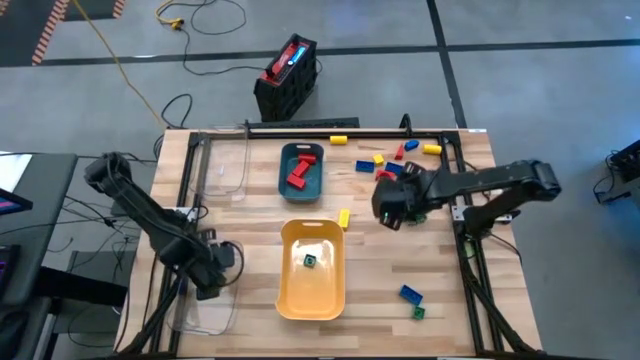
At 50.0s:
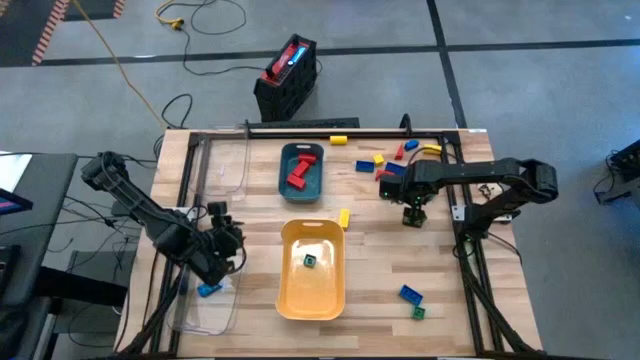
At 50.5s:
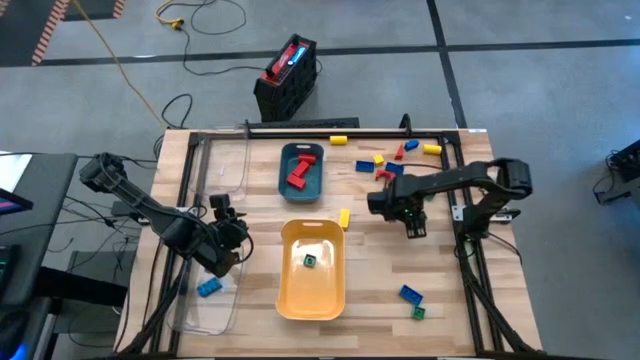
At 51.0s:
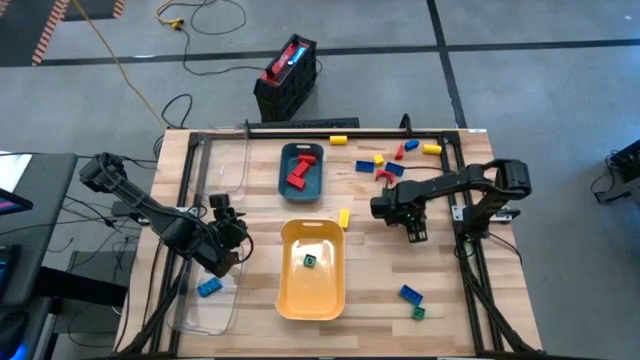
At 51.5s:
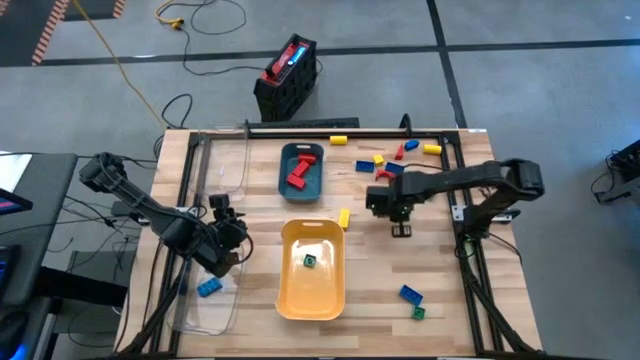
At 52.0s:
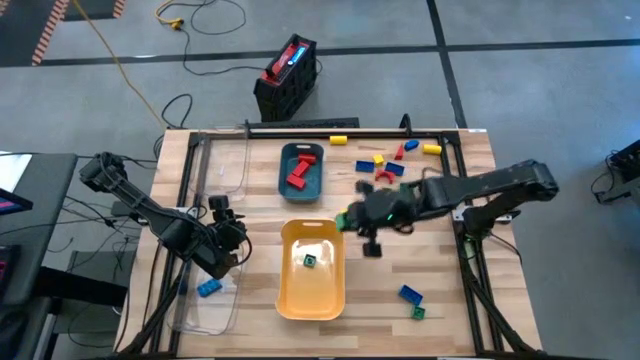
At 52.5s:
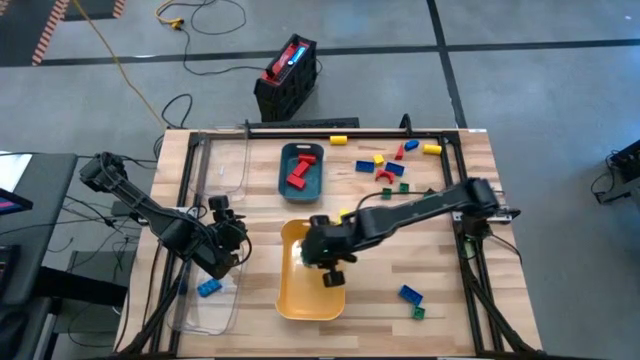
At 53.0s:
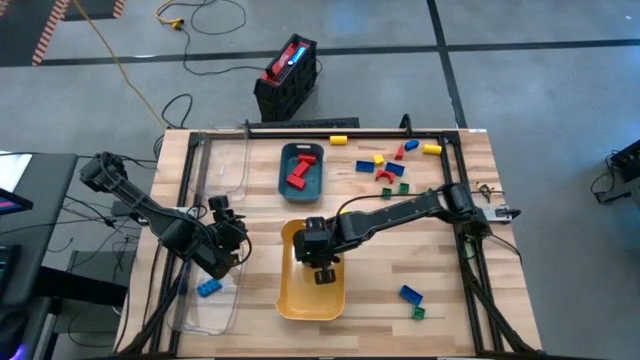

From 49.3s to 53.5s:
Task: Sort blocks
Put the rectangular green game piece into the yellow bin

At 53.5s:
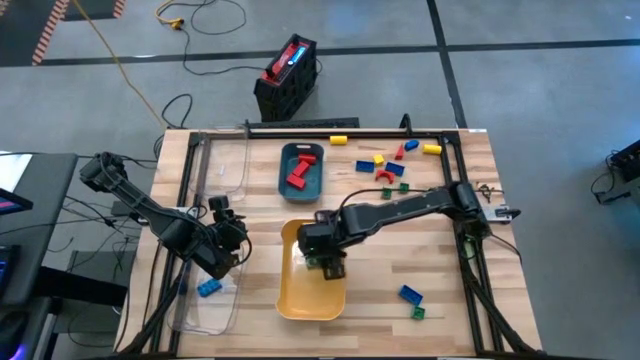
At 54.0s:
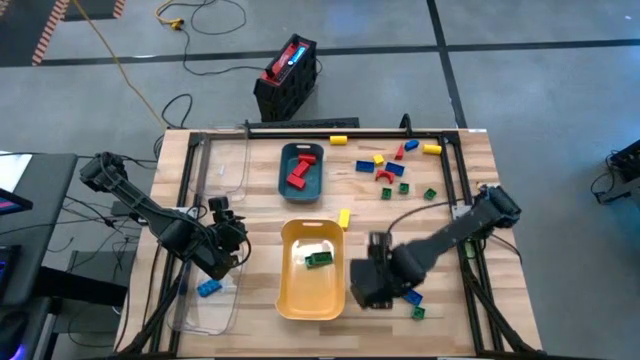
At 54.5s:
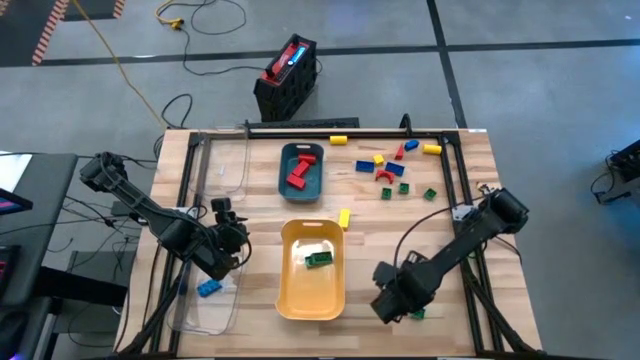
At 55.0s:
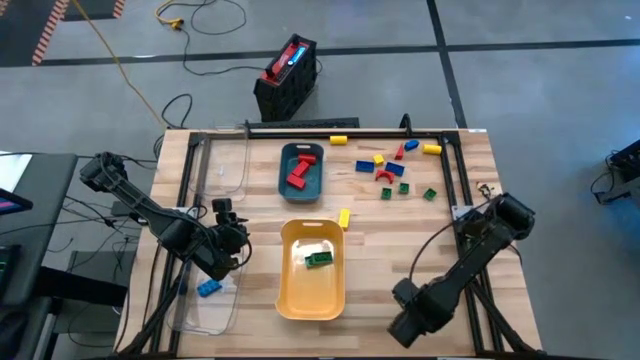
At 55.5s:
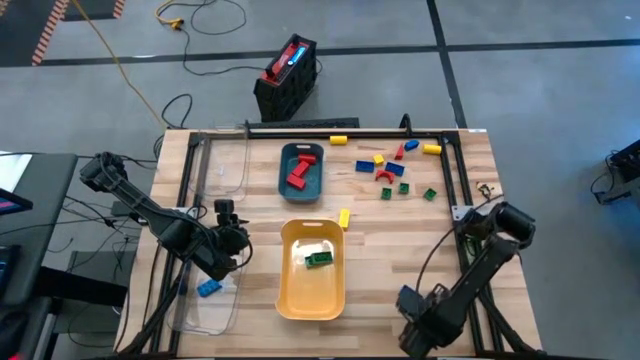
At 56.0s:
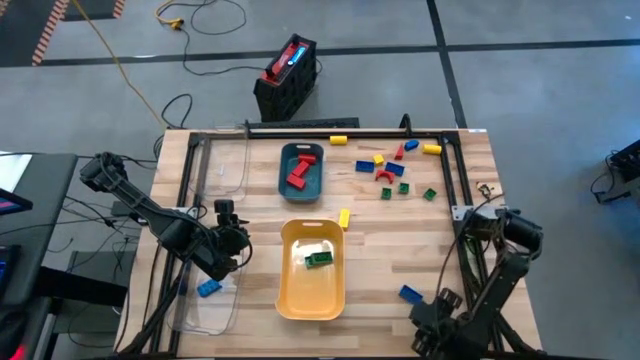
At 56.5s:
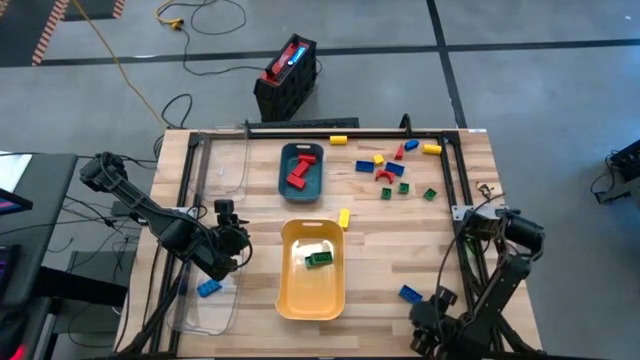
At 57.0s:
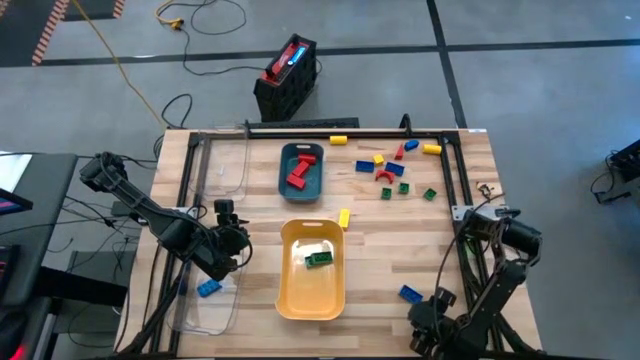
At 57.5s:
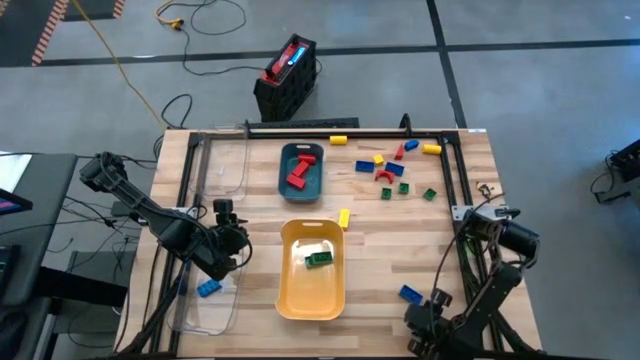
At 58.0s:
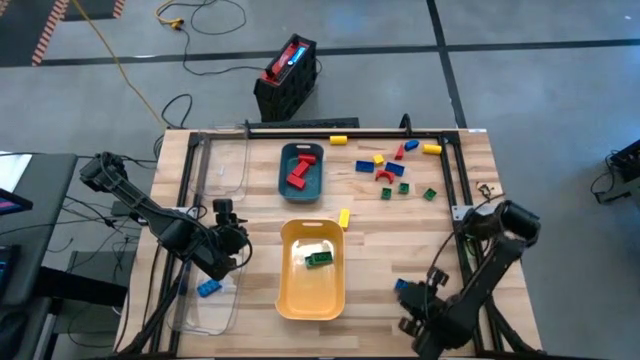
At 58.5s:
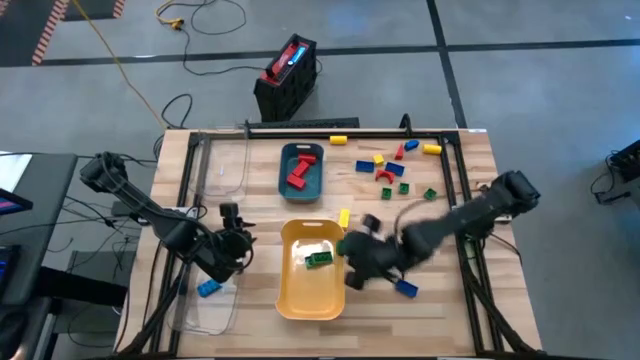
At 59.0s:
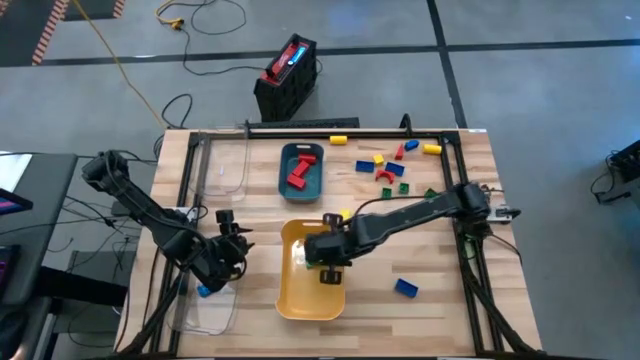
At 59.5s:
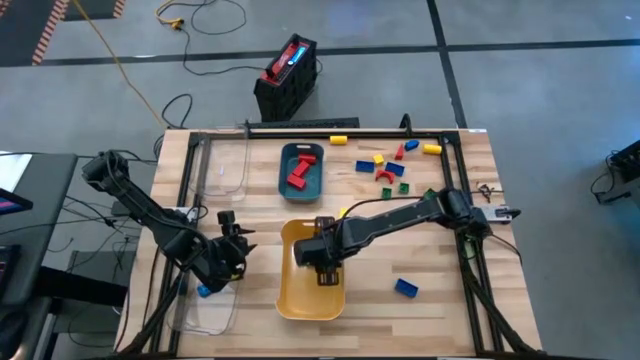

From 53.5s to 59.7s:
Put the square green game piece into the yellow bin

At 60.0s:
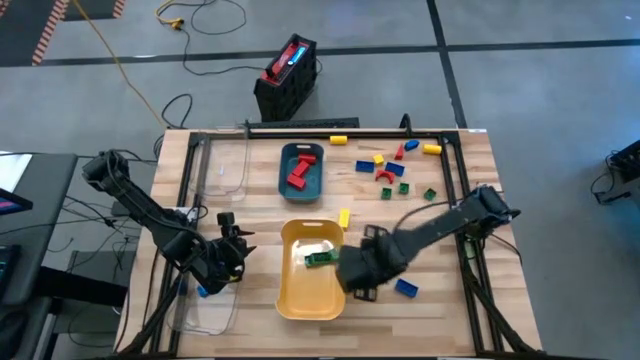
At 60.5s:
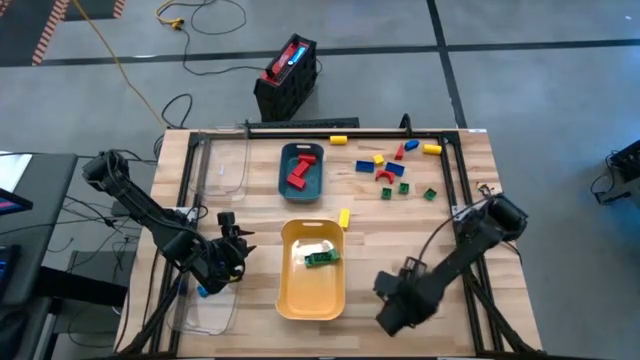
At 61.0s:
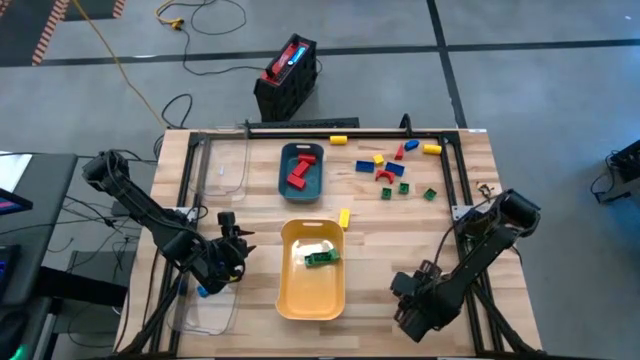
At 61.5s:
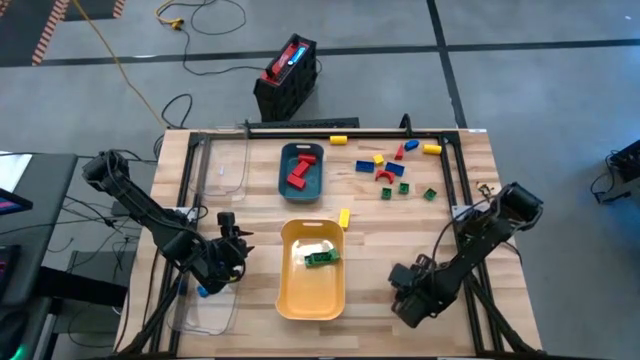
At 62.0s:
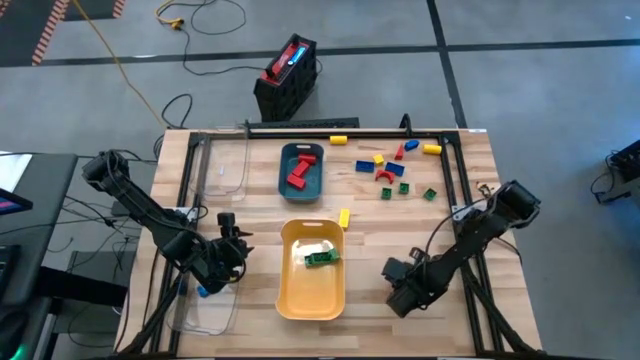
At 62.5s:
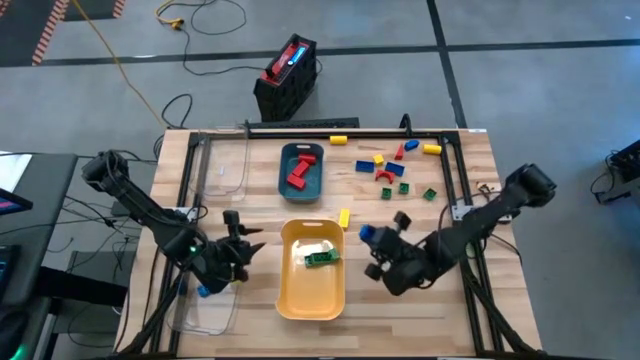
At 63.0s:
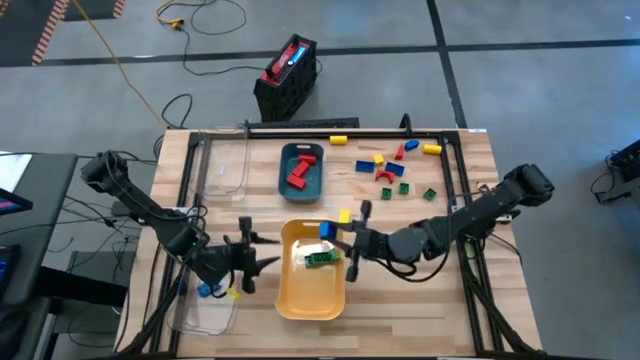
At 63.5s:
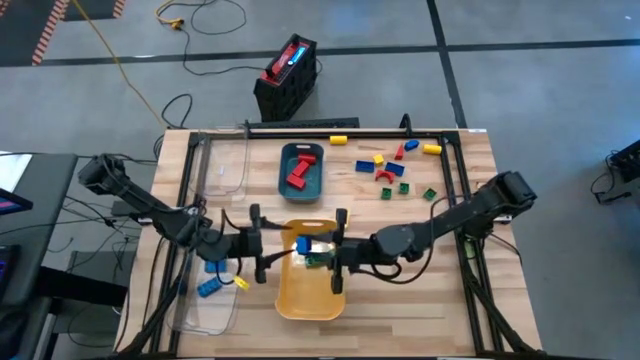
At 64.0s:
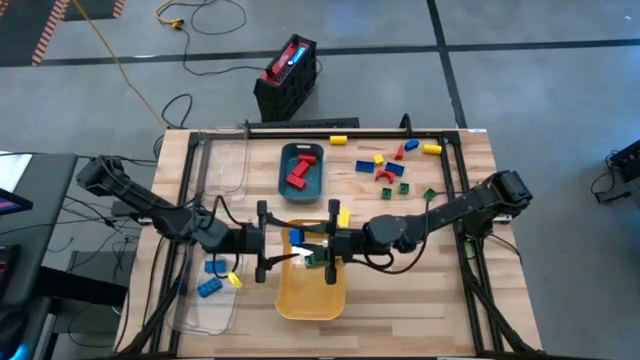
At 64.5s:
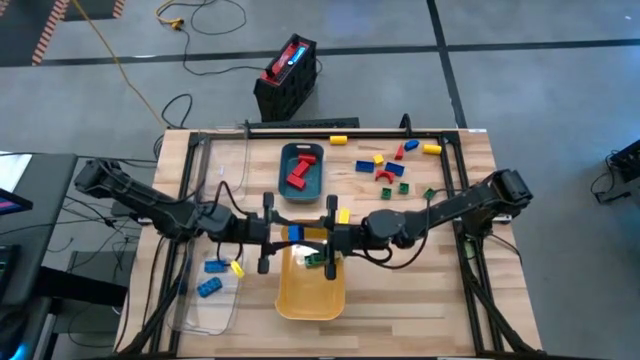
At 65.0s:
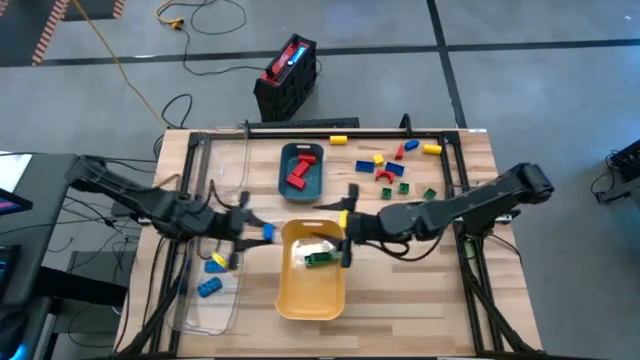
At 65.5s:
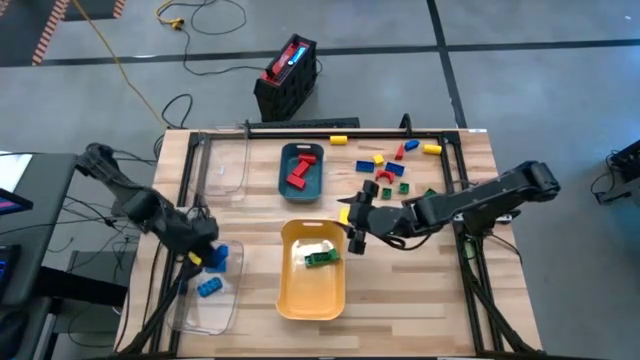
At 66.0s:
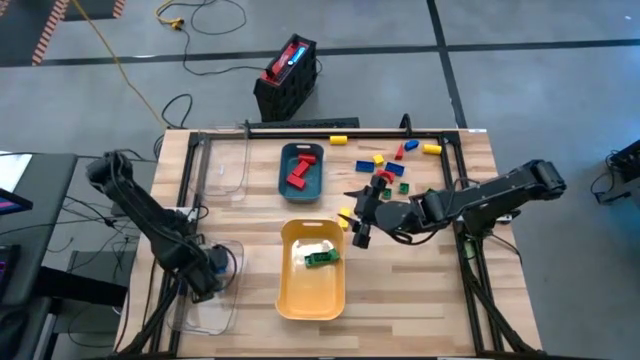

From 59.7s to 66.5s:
Put the rectangular blue game piece into the bottom transparent bin

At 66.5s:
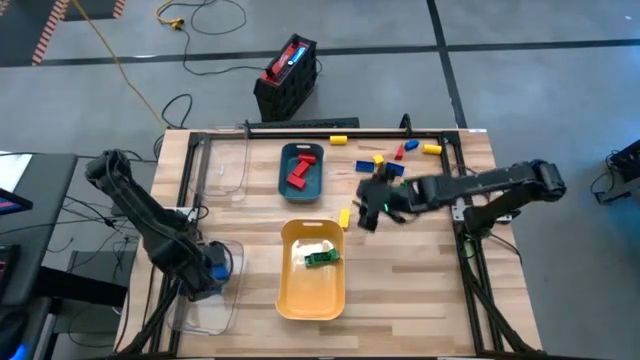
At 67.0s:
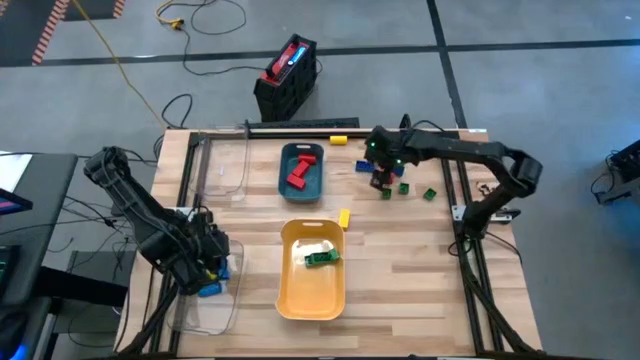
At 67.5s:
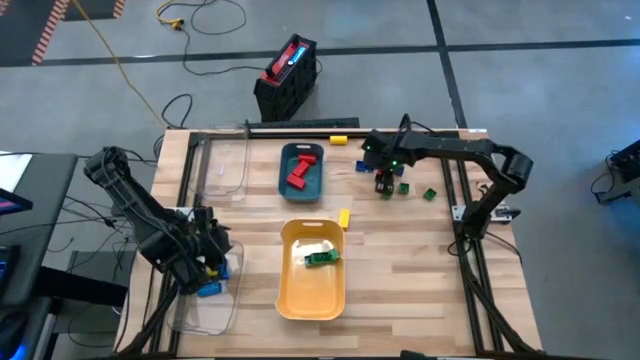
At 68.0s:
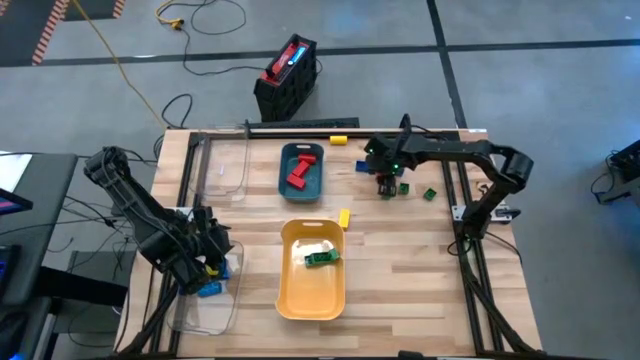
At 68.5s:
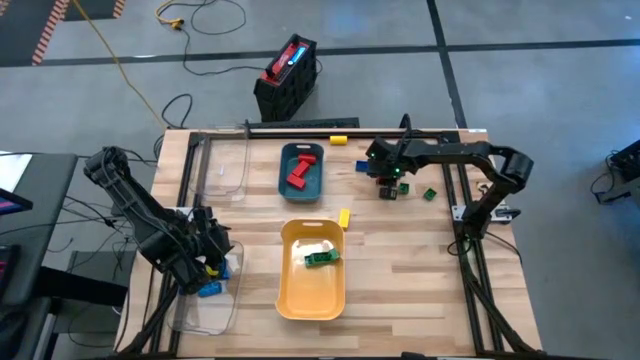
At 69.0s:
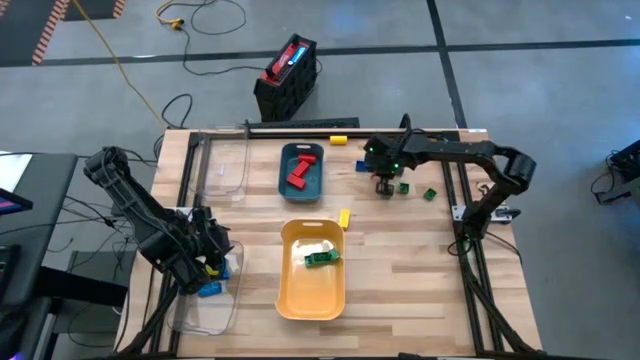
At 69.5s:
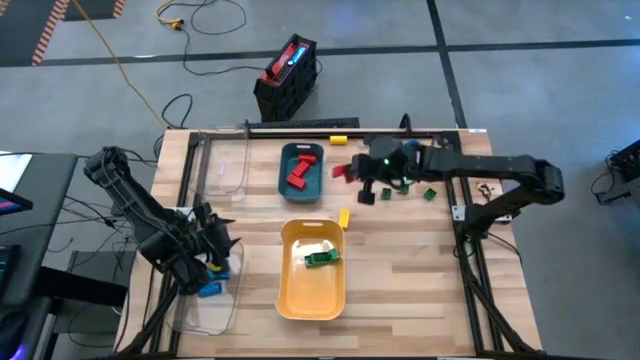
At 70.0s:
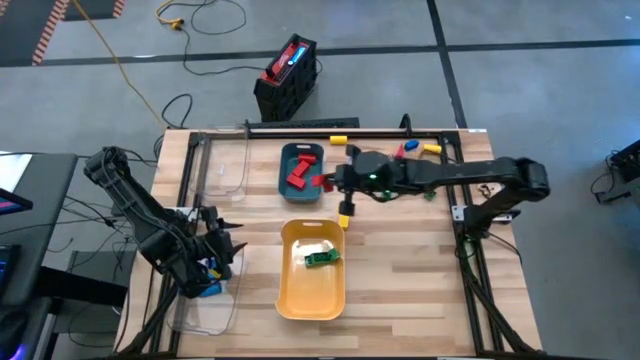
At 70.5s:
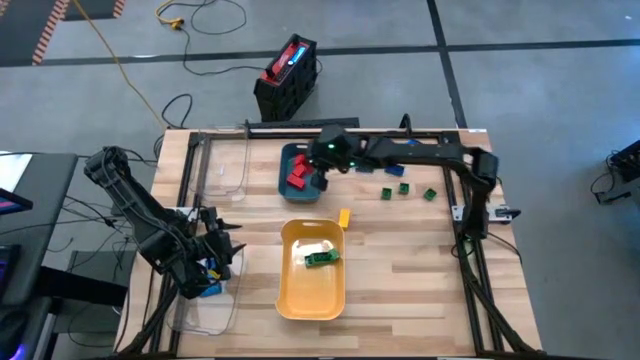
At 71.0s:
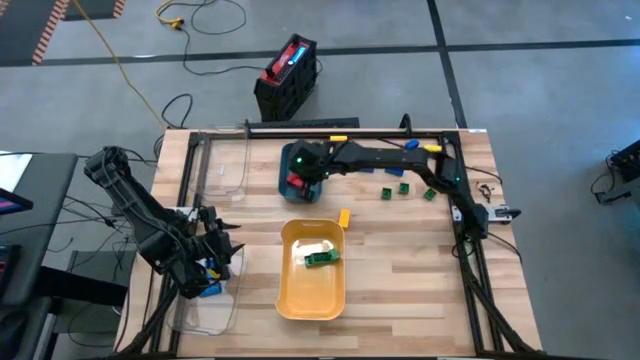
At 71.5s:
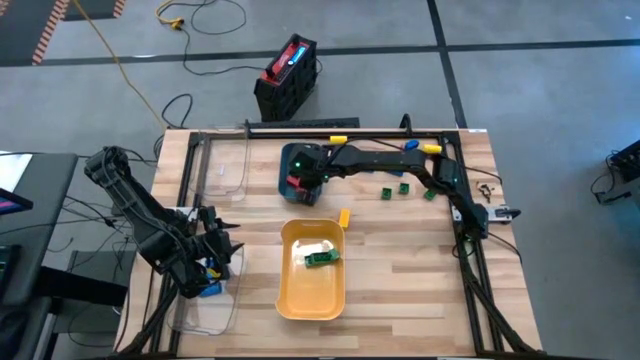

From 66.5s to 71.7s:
Put the red curved wooden block into the blue bin
